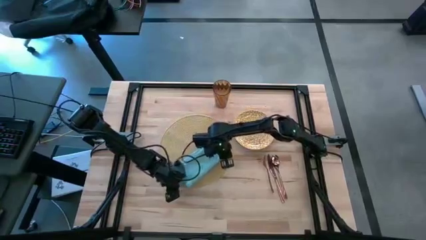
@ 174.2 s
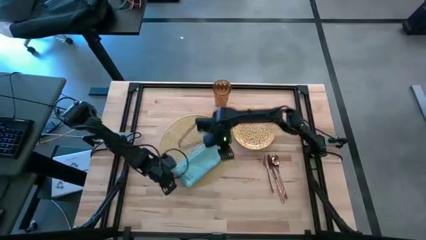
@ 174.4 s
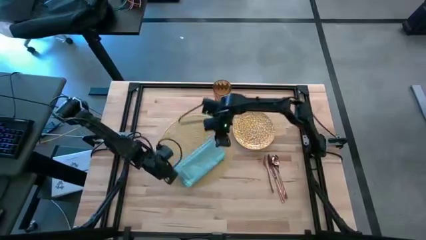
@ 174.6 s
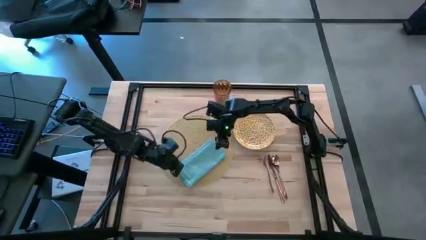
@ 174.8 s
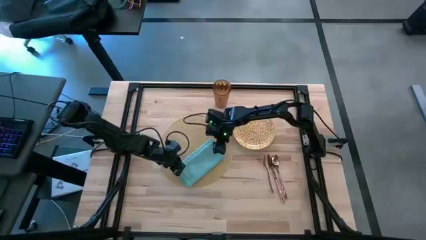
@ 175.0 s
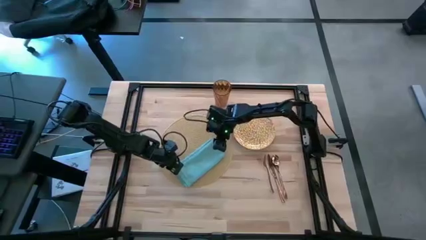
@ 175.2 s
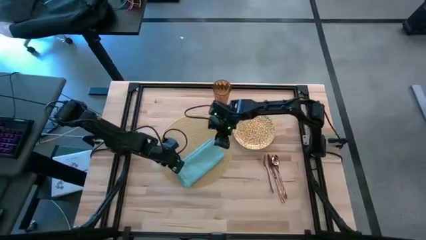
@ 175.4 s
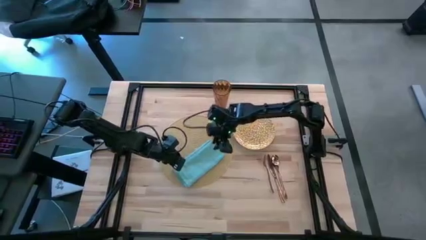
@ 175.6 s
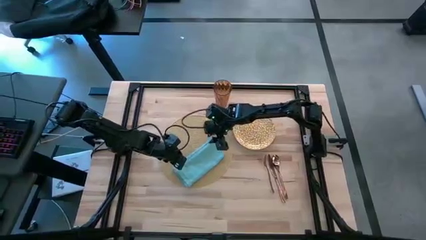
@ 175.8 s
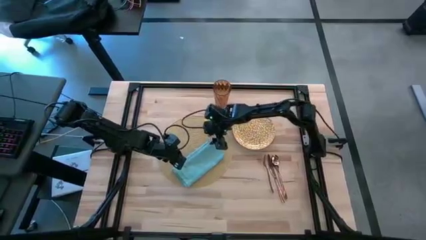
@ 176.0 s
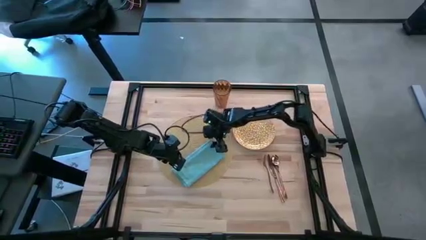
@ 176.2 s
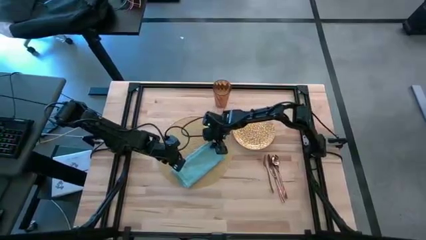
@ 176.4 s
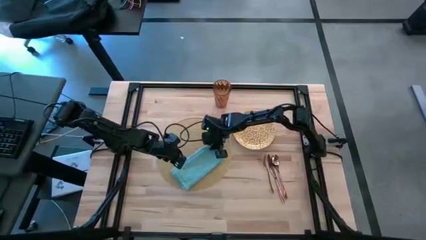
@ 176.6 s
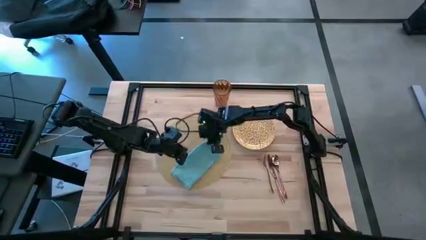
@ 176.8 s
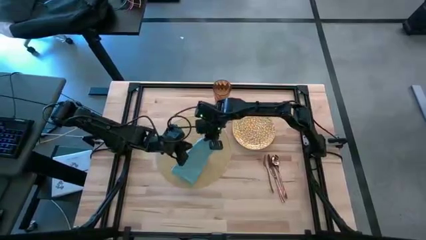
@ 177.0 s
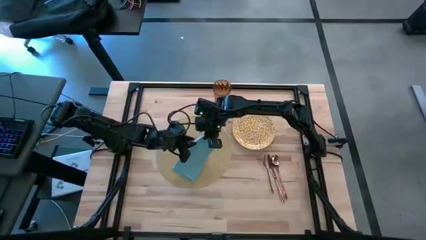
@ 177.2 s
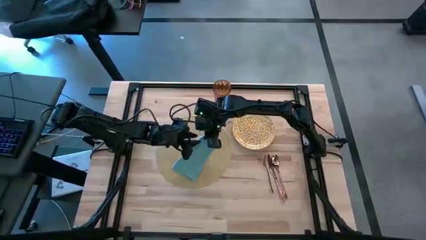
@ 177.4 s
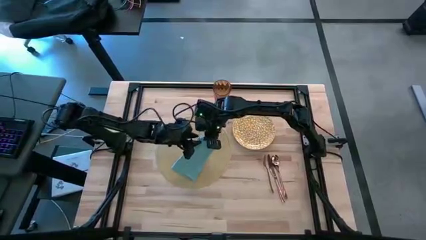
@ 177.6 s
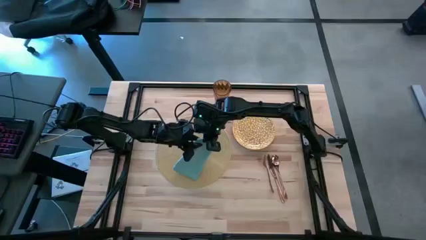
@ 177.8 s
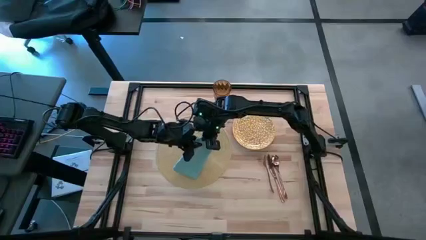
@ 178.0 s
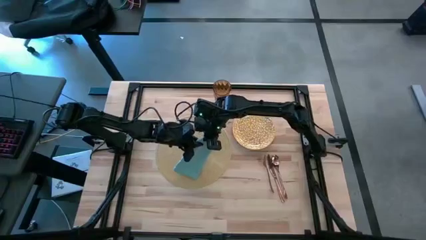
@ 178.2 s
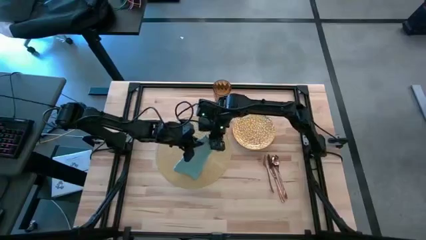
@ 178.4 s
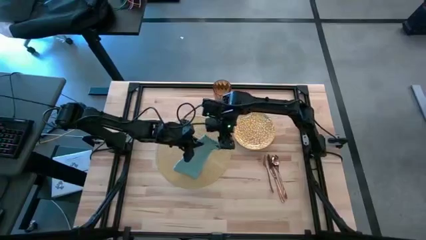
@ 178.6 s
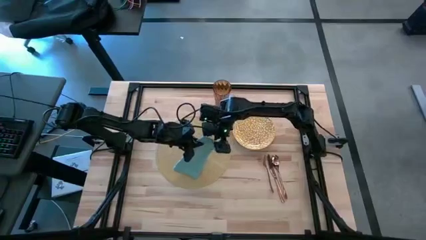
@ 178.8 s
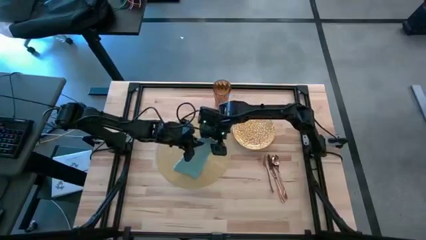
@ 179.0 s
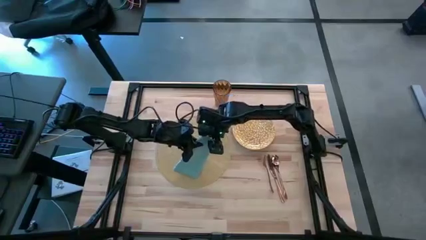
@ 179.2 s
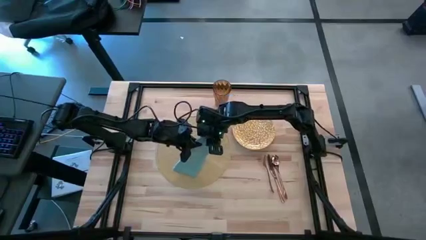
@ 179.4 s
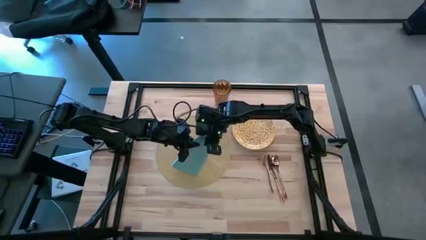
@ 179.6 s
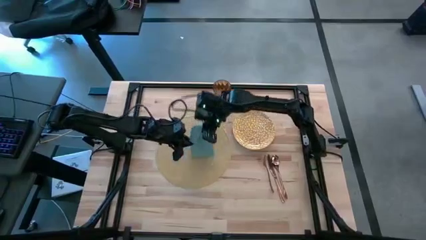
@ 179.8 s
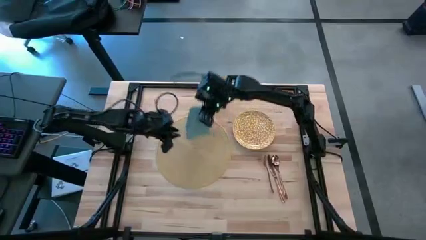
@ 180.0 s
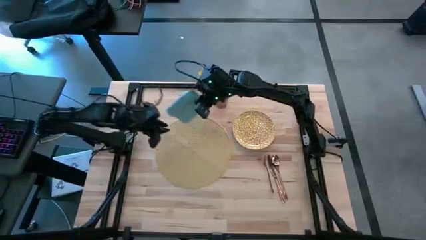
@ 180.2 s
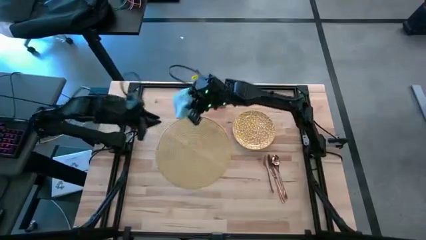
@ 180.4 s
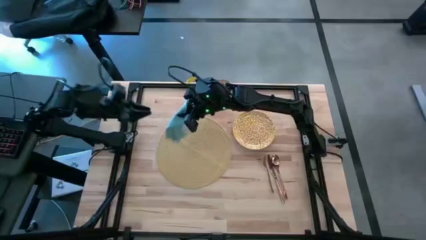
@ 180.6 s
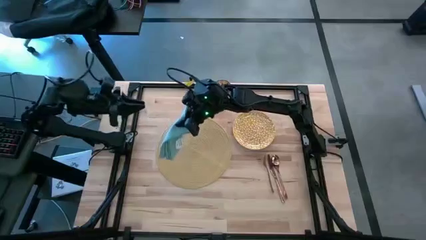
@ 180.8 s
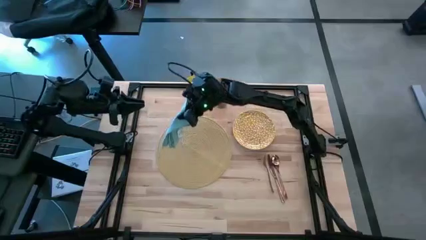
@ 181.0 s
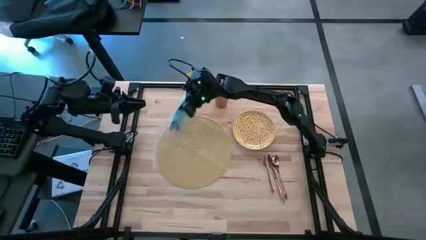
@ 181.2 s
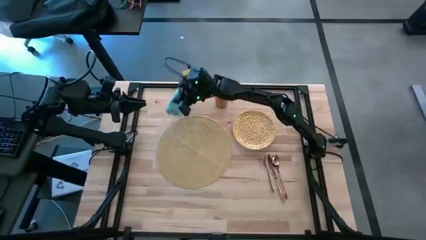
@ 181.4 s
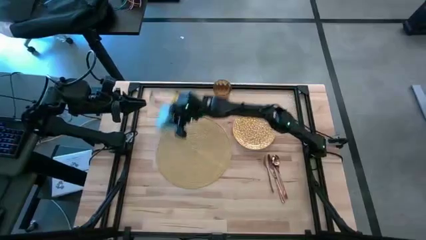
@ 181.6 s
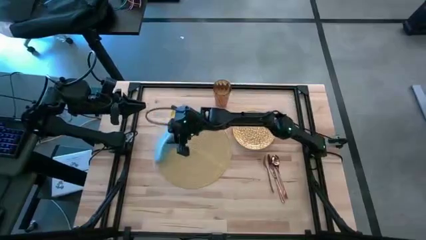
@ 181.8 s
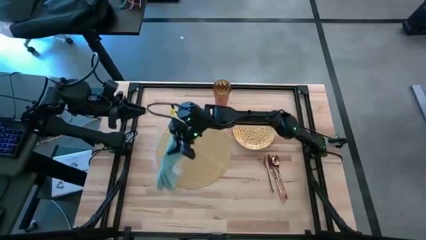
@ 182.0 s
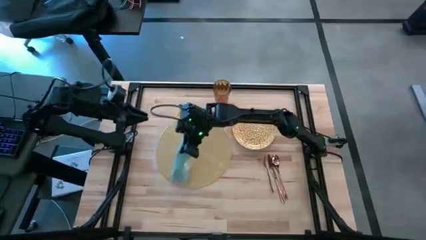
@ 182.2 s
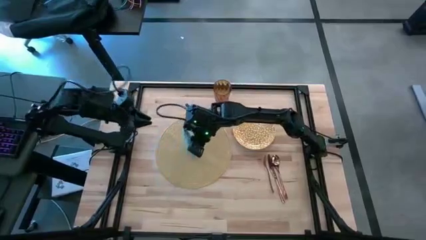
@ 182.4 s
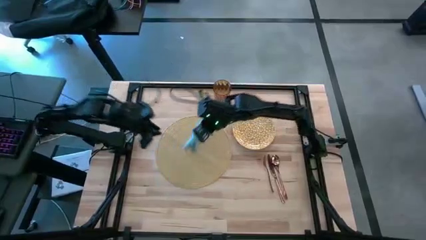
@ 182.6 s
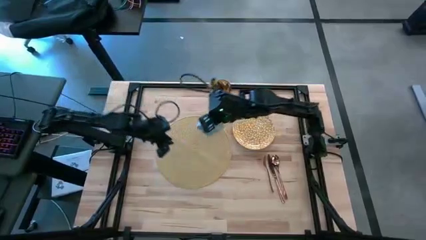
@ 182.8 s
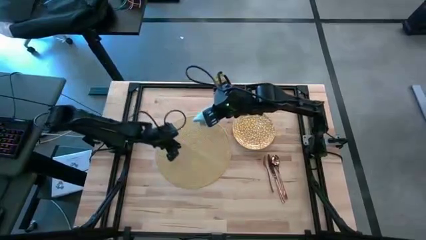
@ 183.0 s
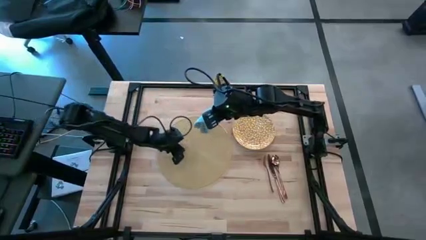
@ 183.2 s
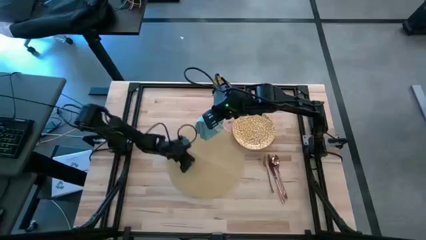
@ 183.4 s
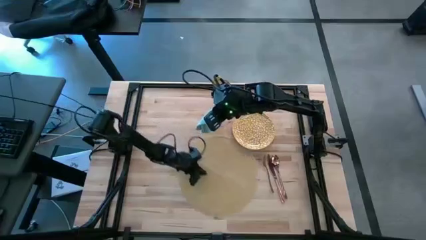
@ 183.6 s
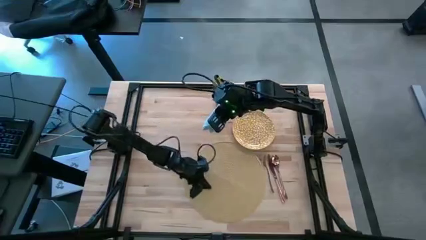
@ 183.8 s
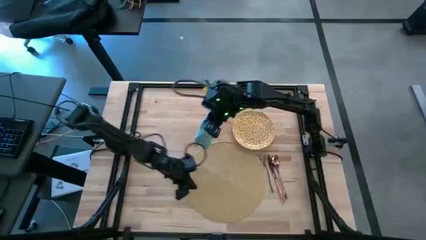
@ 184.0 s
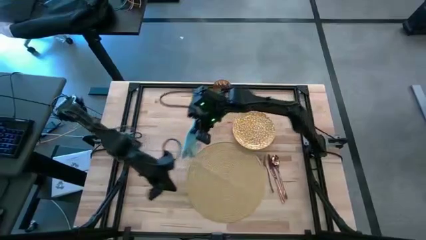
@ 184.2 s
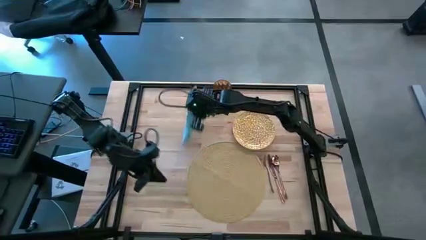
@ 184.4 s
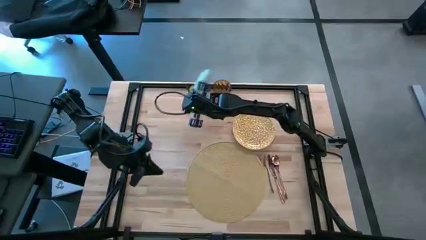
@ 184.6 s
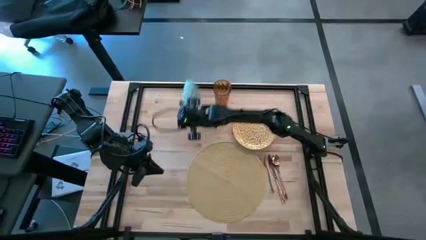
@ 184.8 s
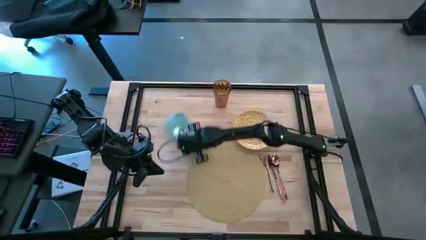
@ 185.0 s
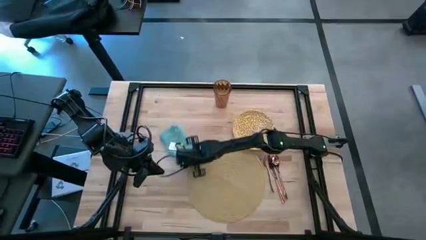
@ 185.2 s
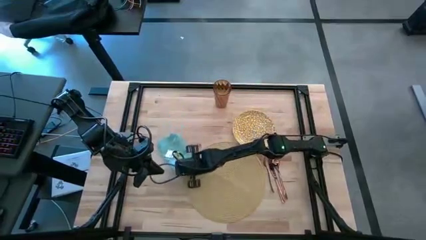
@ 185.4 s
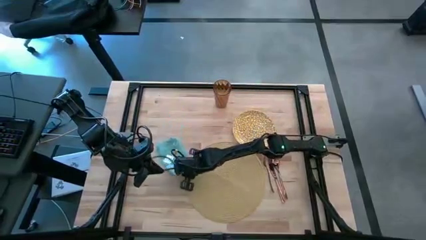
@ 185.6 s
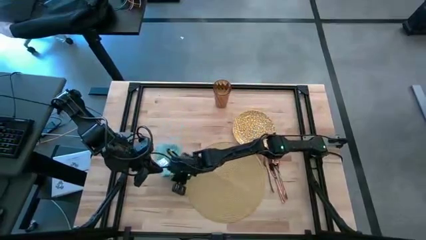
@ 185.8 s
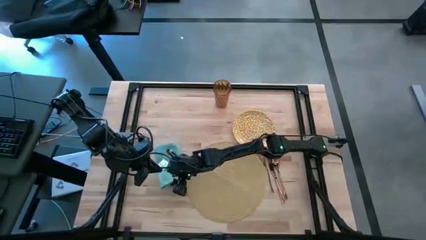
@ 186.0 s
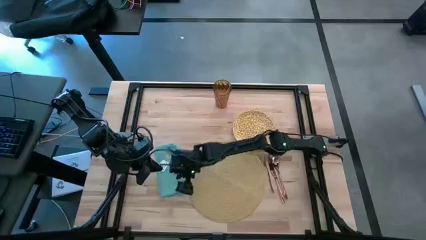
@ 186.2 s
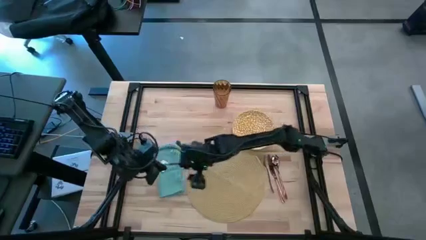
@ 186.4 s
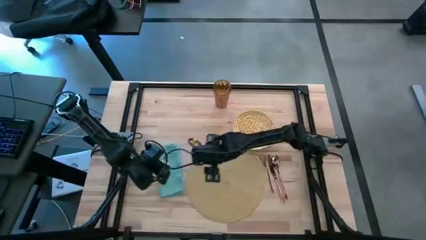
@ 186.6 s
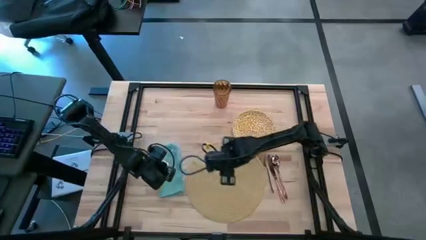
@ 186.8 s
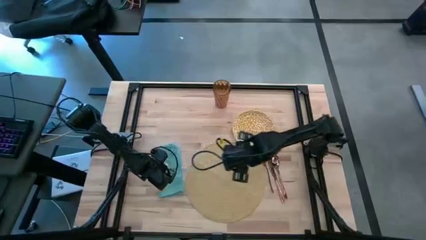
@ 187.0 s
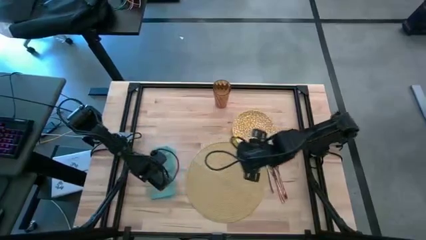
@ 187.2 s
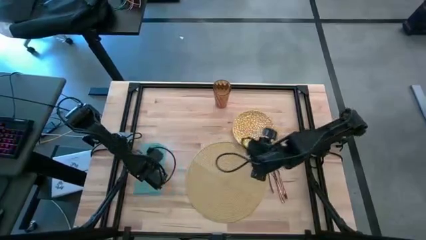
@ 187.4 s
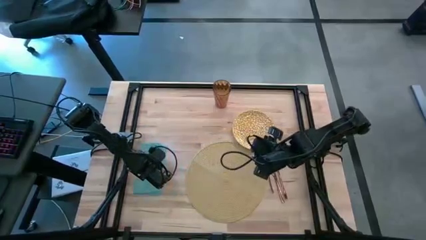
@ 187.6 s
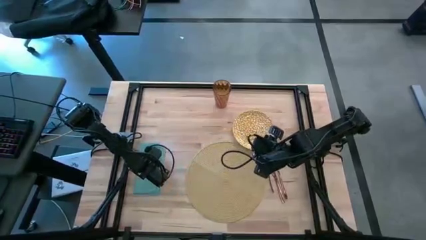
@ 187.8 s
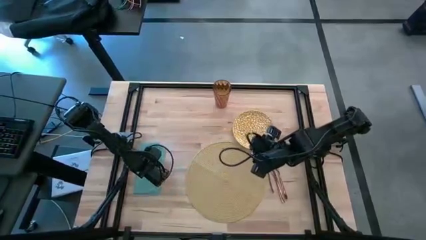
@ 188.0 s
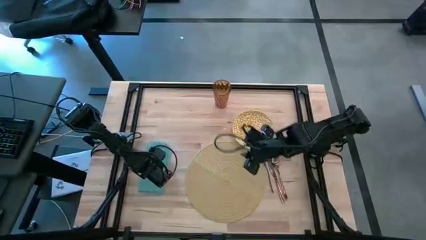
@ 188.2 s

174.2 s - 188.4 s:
Task: Set table place
Move the blue table napkin to the middle left of the table

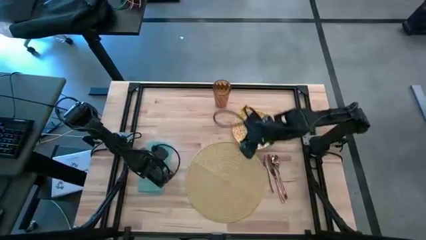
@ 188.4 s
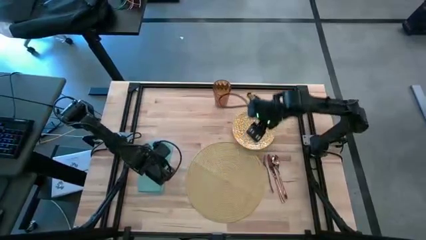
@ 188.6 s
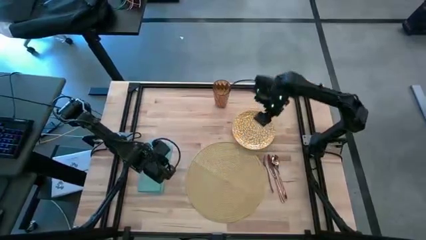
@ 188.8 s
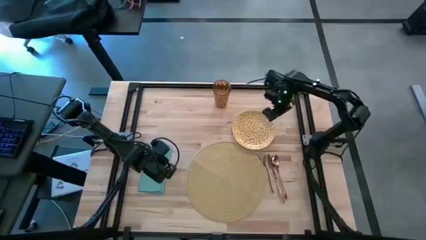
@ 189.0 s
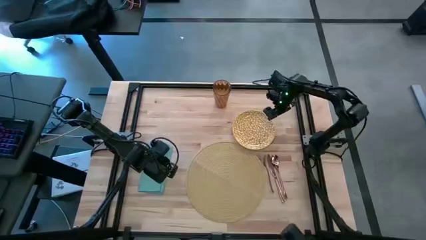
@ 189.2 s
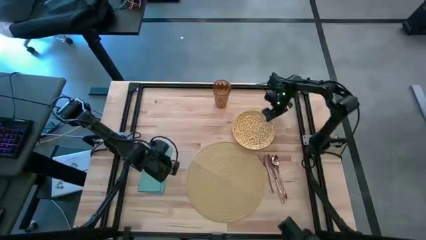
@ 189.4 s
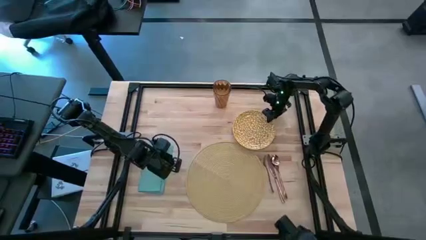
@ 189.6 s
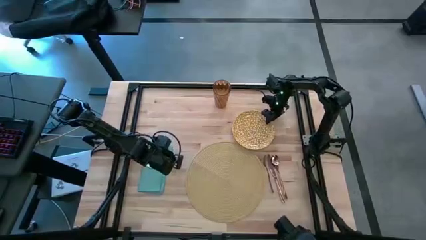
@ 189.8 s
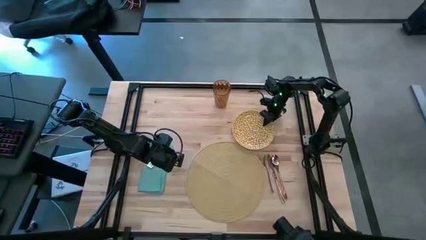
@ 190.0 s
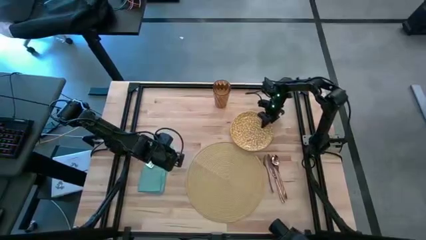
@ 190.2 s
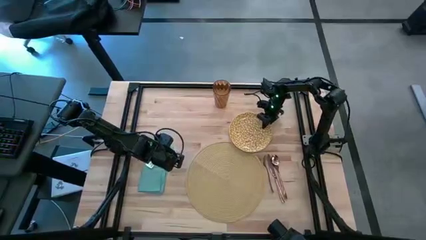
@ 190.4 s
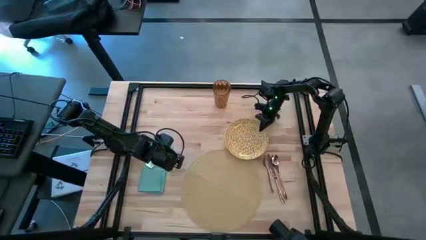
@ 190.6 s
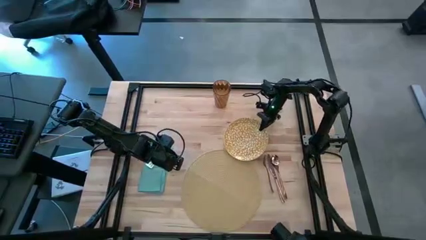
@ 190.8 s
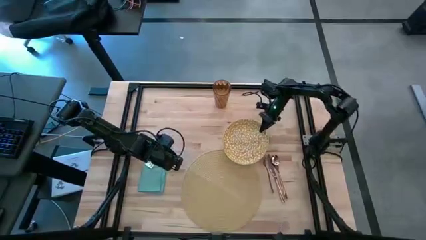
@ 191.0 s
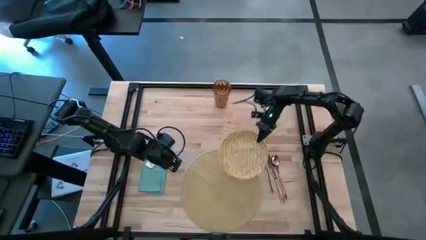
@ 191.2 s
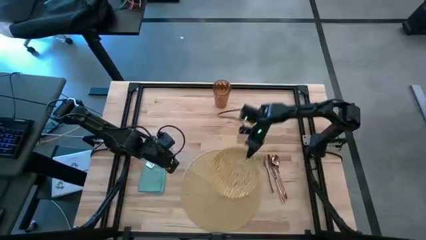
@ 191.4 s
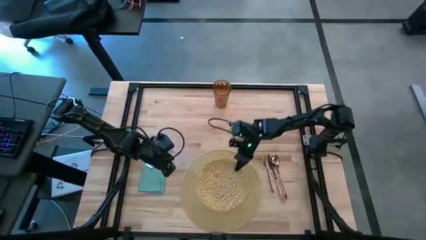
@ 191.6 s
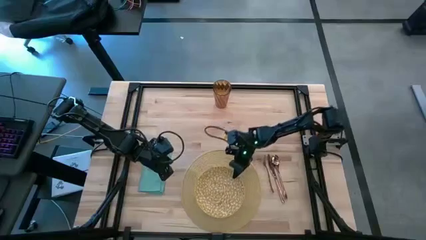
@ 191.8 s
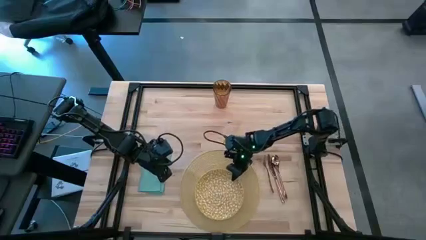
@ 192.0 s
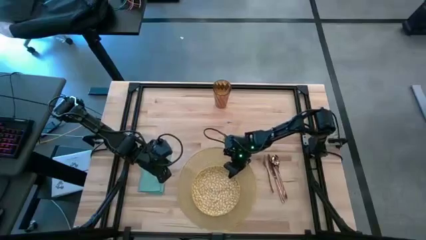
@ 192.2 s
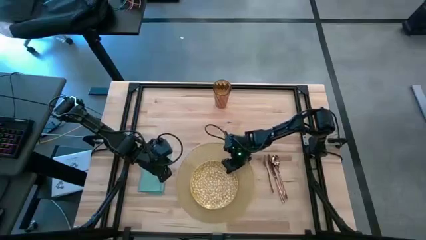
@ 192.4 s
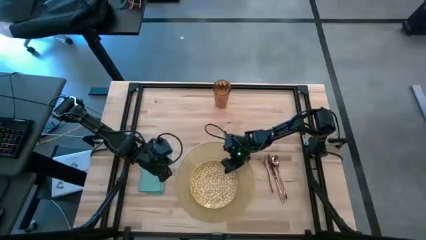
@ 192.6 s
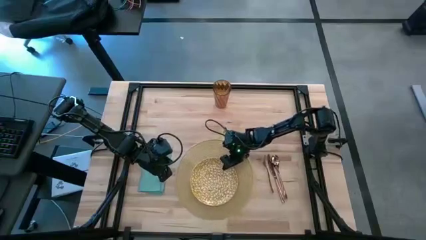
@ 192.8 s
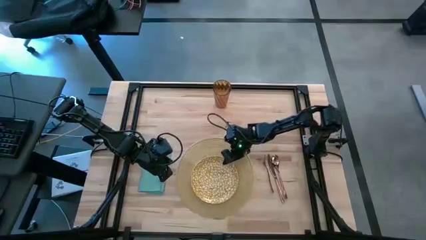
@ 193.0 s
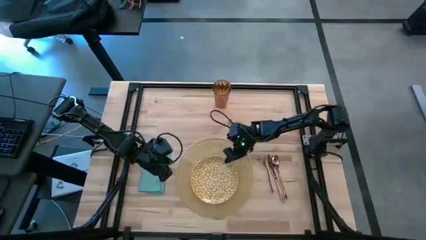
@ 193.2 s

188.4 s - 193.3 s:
Put the yellow plate on the brown place mat to the right of the blue table napkin
